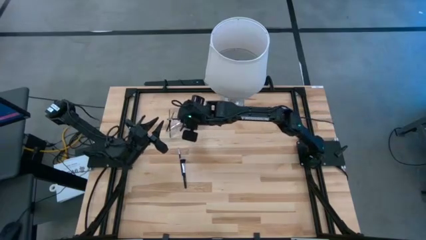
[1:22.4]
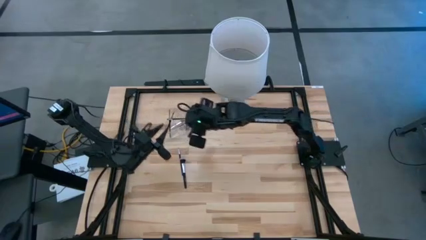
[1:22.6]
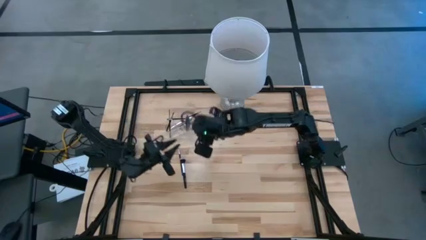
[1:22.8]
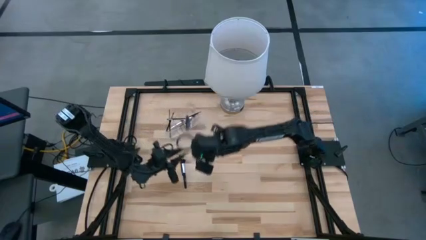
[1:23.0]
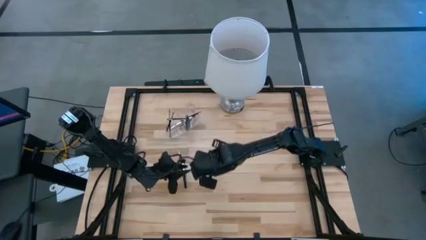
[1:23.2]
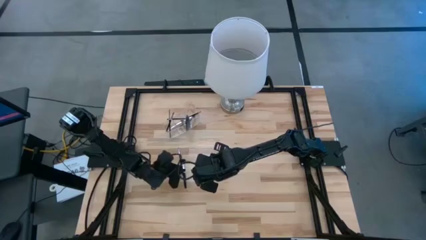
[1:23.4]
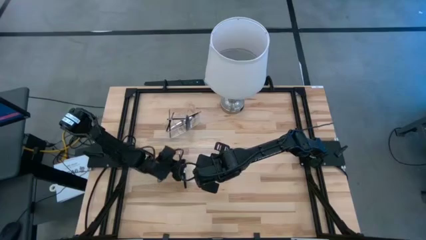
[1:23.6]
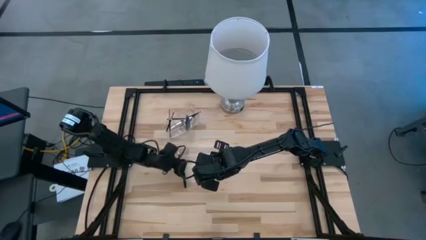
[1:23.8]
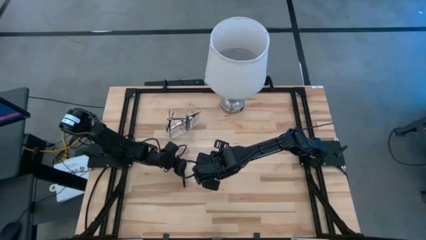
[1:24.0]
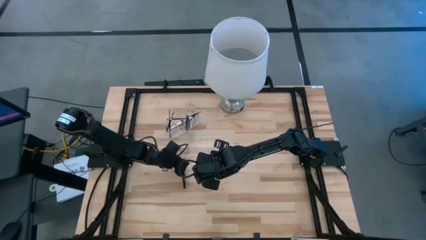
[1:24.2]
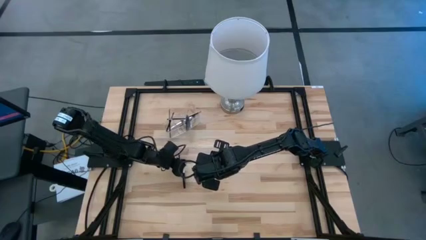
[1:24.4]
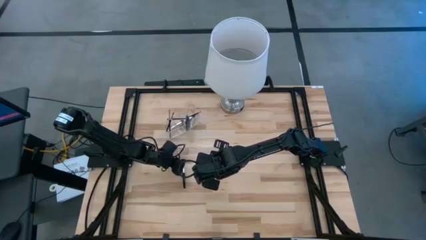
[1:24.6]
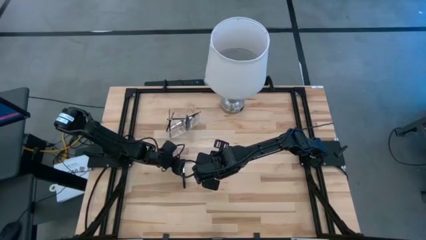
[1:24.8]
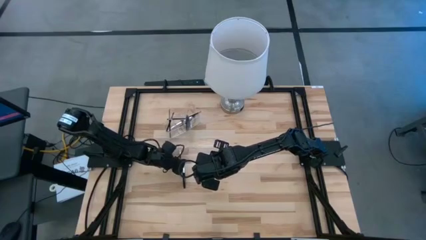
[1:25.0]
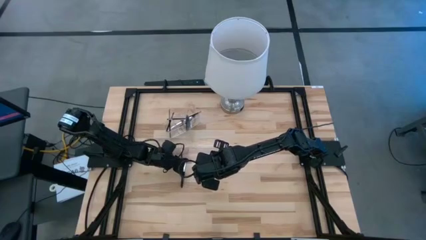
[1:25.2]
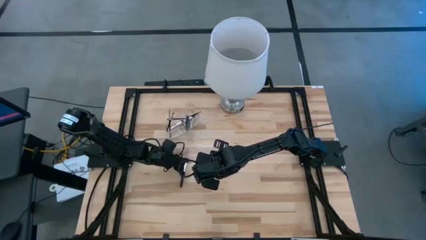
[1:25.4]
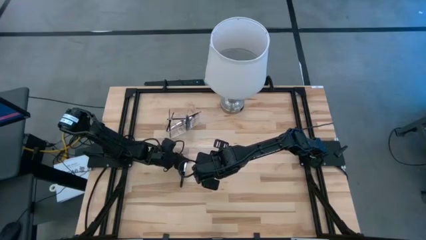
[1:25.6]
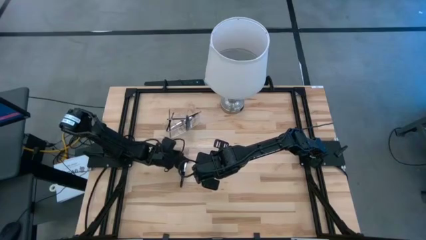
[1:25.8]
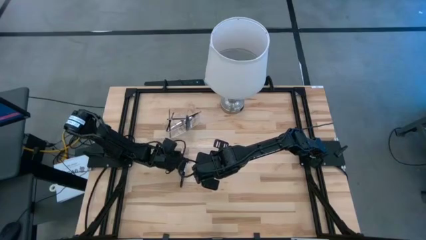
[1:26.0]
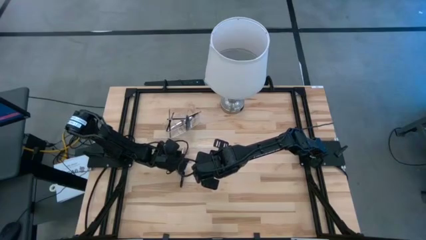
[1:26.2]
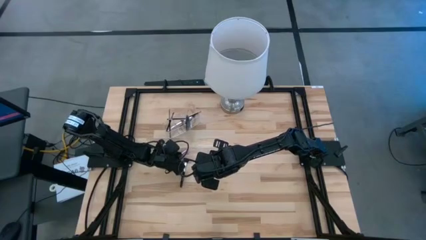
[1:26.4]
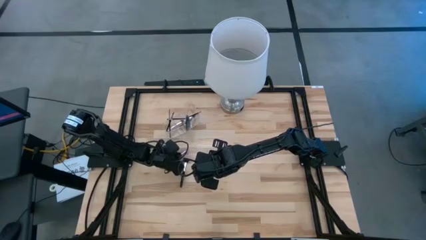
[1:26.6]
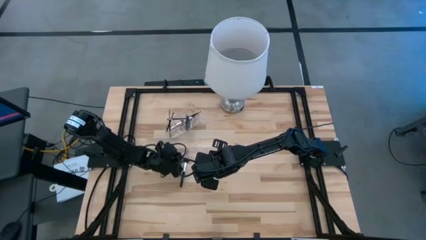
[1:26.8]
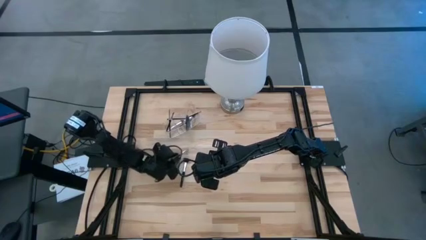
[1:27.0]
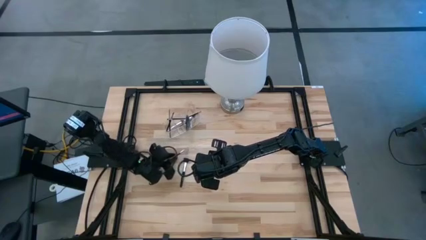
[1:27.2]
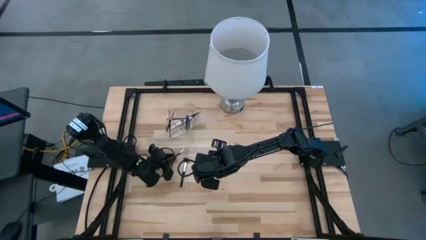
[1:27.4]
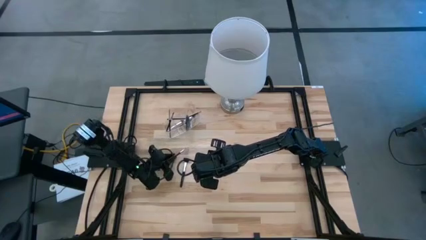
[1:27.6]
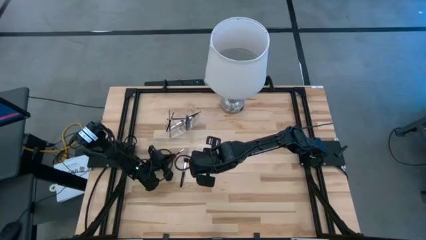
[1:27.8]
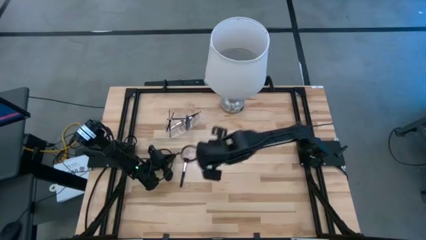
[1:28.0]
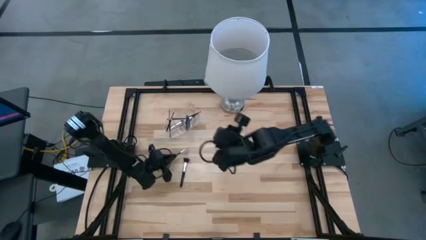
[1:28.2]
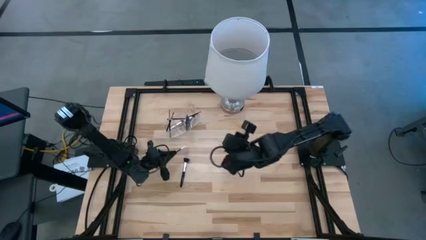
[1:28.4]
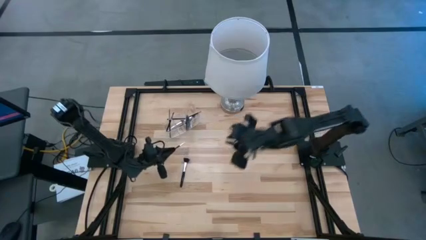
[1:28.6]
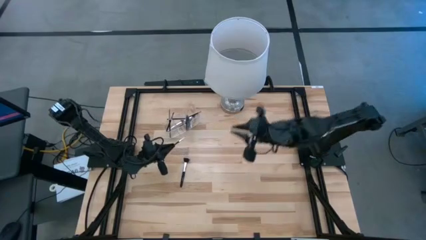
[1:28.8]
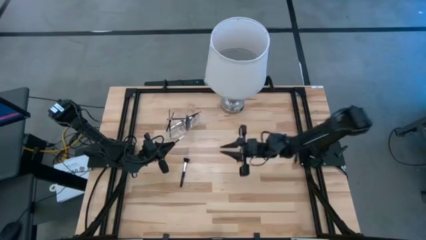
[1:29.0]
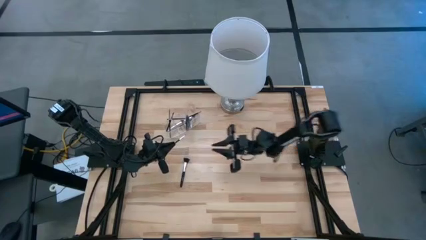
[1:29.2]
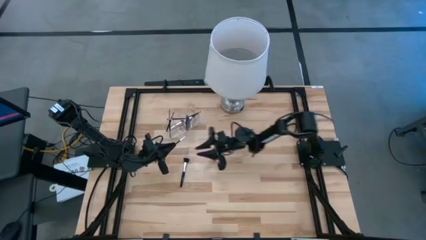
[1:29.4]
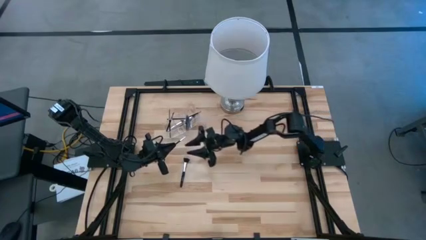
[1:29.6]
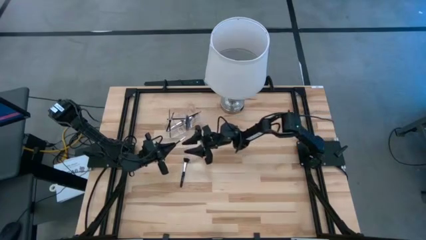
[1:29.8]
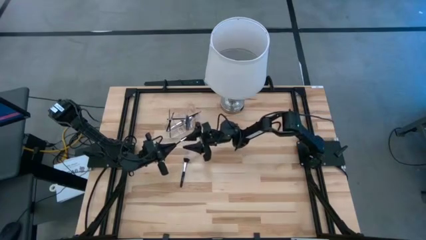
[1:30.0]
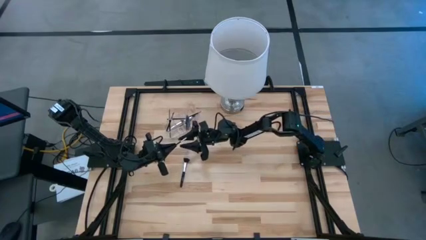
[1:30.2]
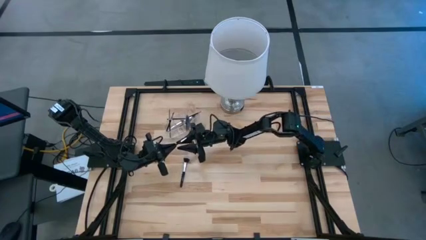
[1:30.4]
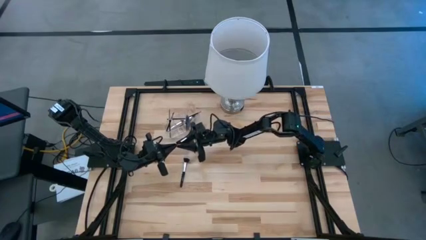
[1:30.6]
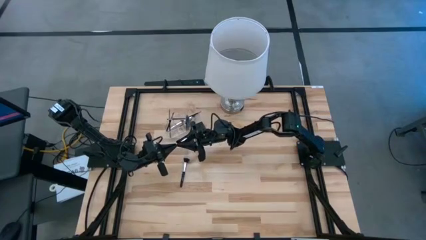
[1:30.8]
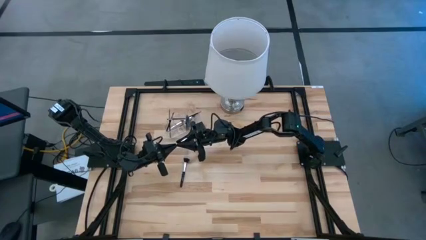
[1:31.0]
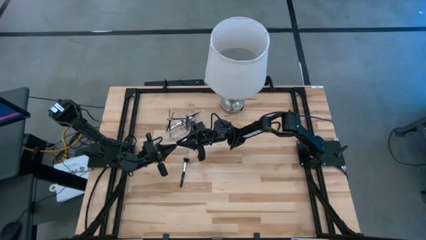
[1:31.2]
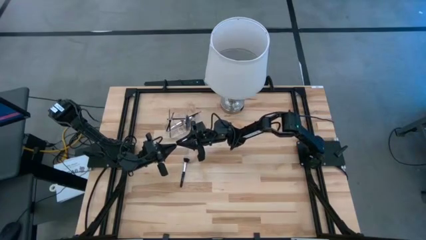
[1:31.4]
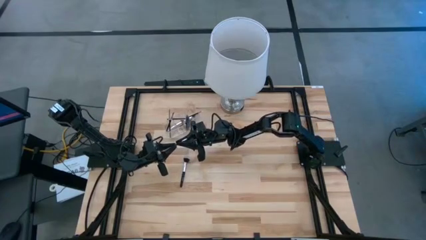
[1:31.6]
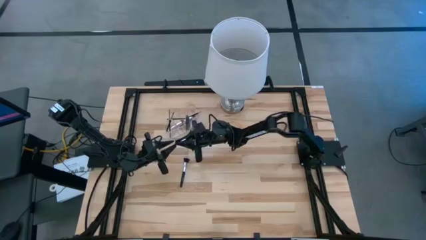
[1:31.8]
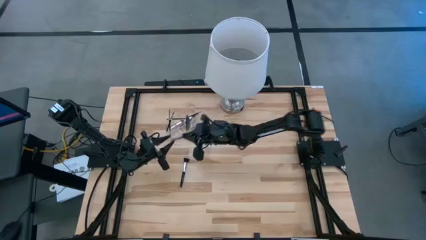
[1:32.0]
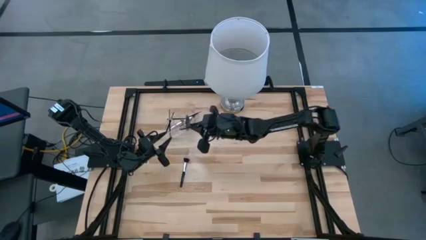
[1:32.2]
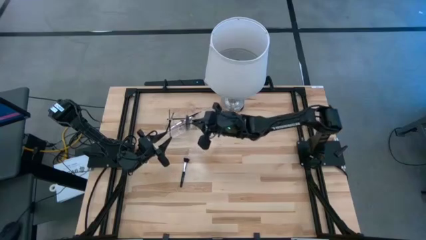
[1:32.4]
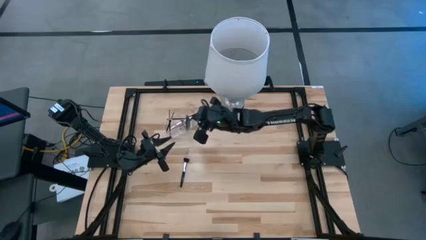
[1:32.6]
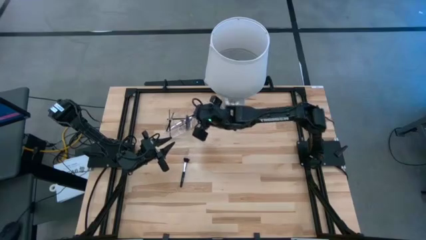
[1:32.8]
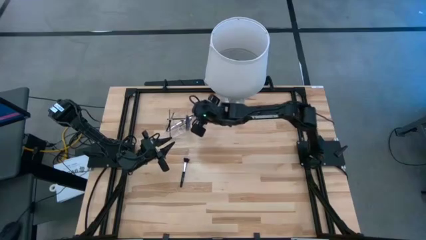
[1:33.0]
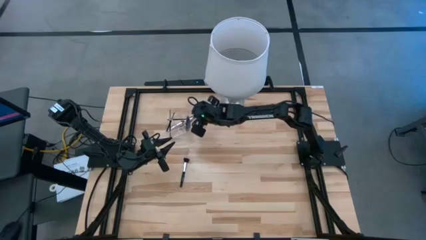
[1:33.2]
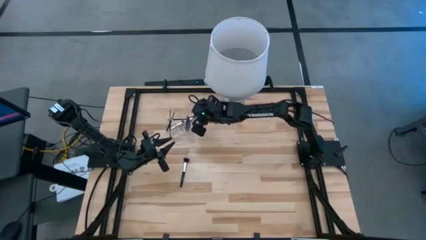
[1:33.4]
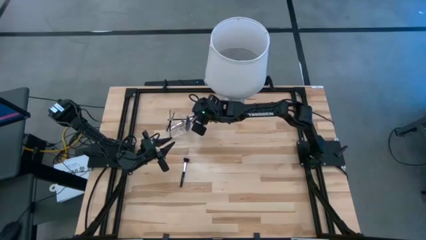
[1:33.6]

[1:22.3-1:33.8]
Task: Put items in baskets/containers
Put the black brow brush into the transparent organizer

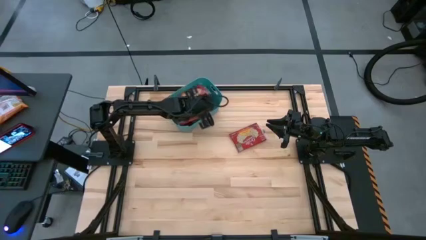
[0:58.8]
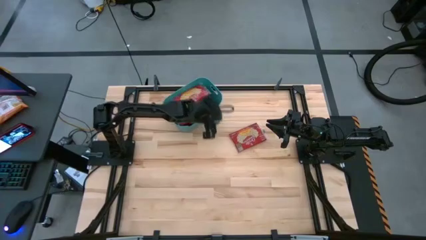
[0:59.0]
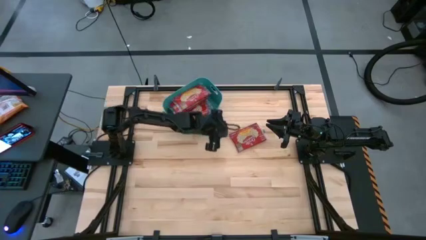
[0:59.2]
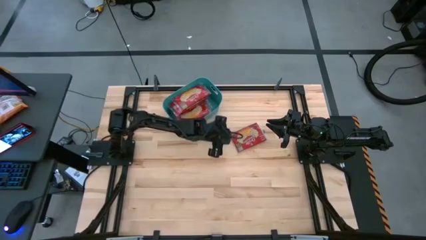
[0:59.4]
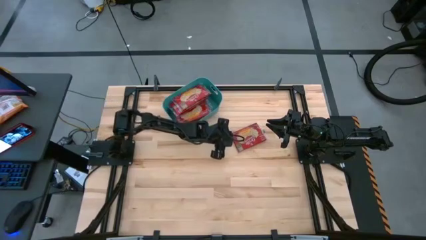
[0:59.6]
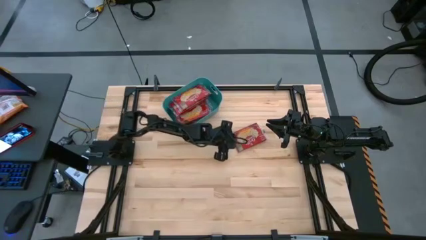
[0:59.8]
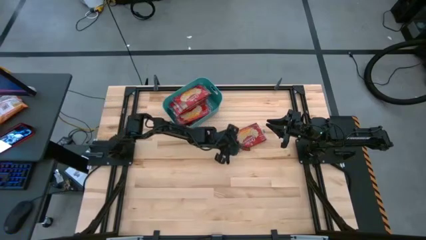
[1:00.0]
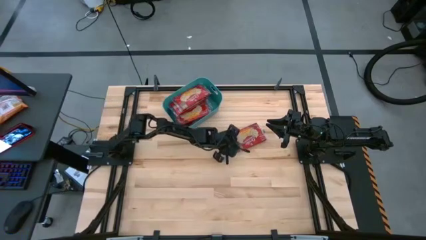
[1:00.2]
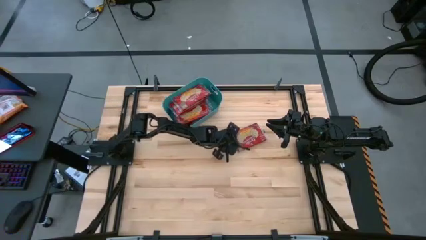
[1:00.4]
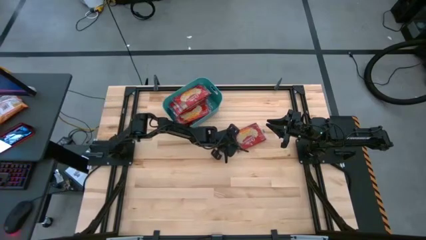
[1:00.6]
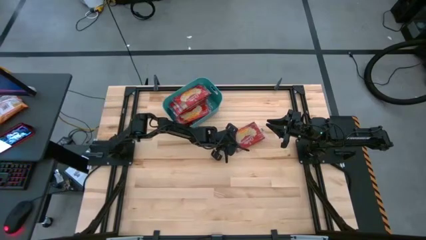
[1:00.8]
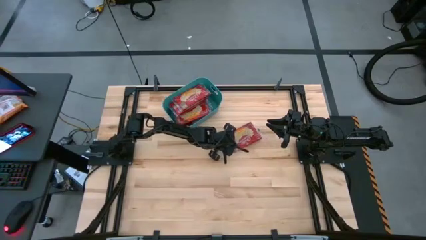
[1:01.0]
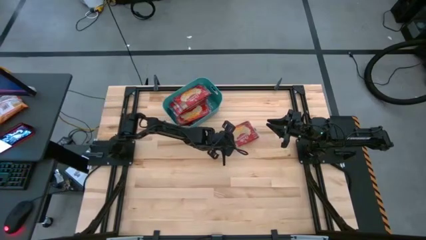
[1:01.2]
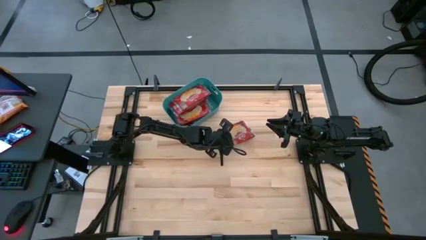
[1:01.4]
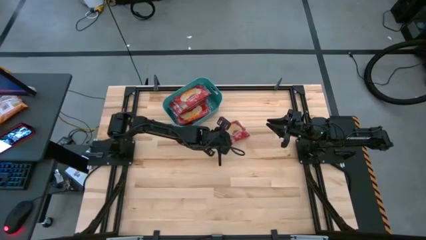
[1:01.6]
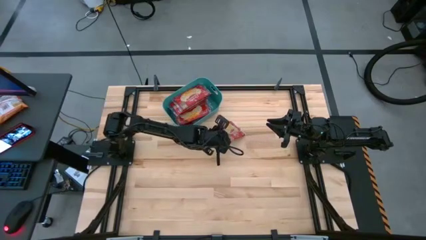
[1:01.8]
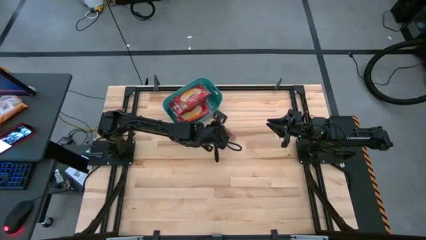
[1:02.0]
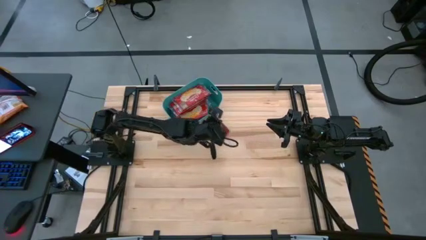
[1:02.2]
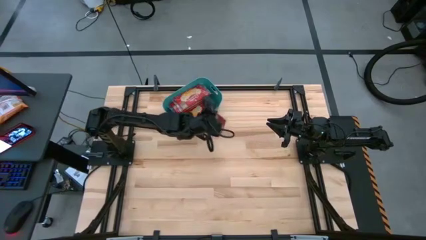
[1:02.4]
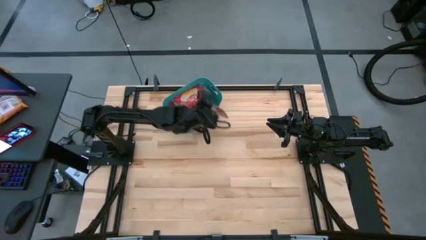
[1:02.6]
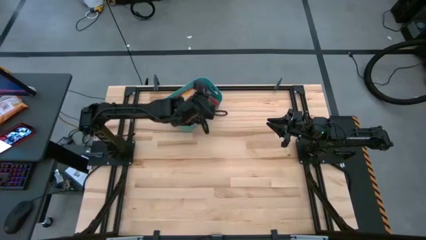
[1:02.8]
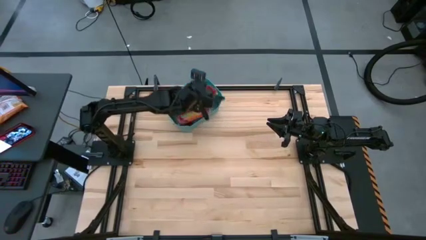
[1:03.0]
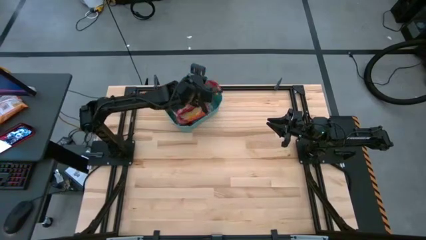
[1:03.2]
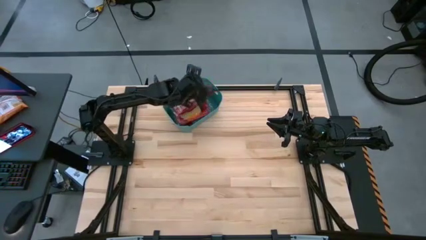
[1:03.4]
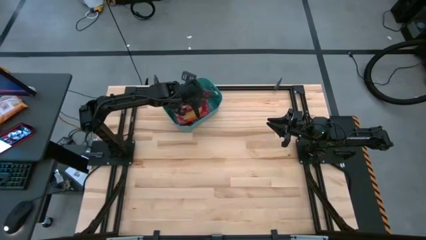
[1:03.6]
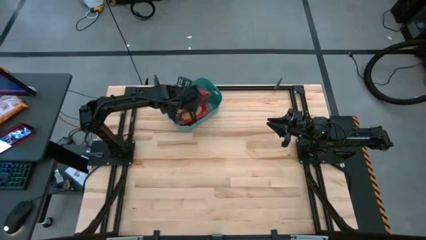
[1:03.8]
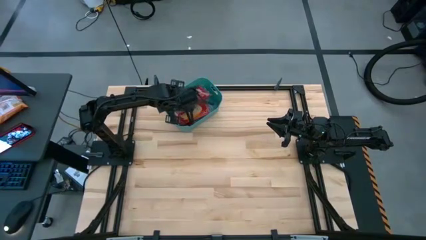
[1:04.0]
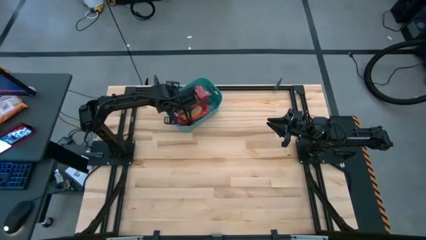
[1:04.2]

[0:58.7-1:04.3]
Task: Sort popcorn bags into baskets
Put the red popcorn bag into the green bin
